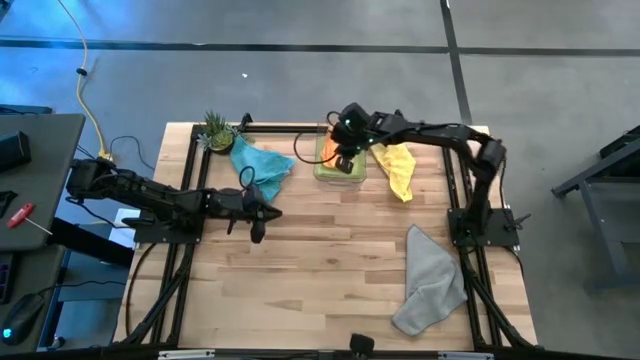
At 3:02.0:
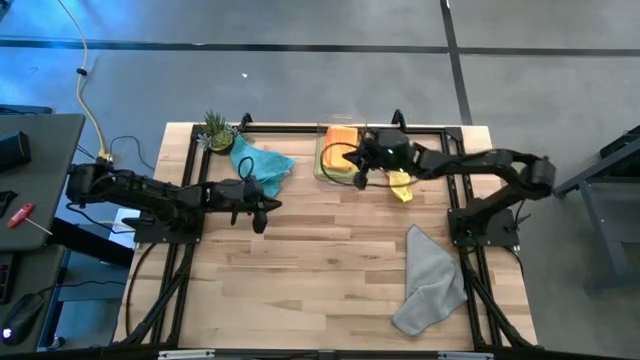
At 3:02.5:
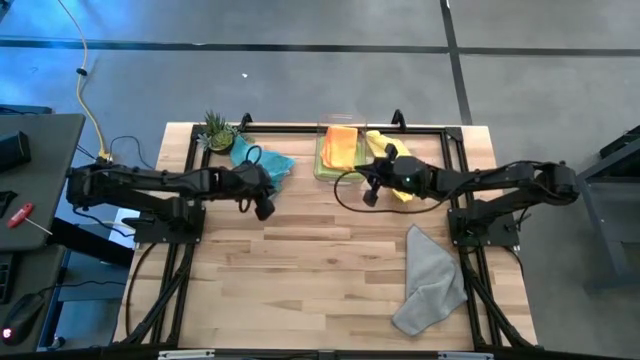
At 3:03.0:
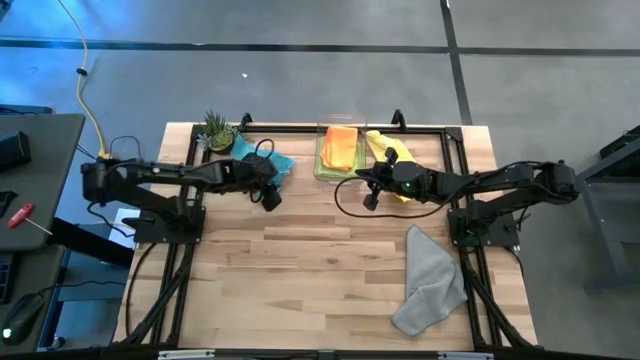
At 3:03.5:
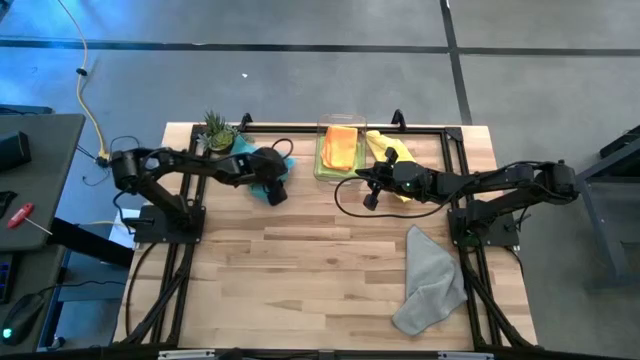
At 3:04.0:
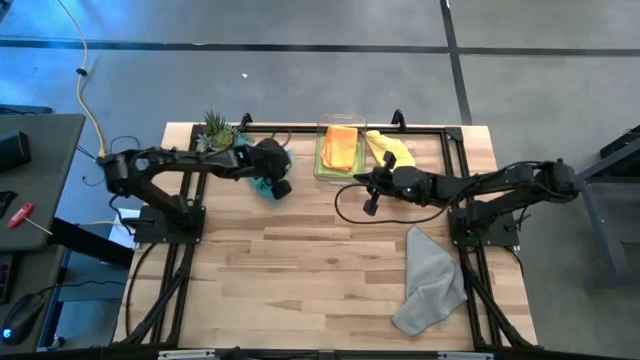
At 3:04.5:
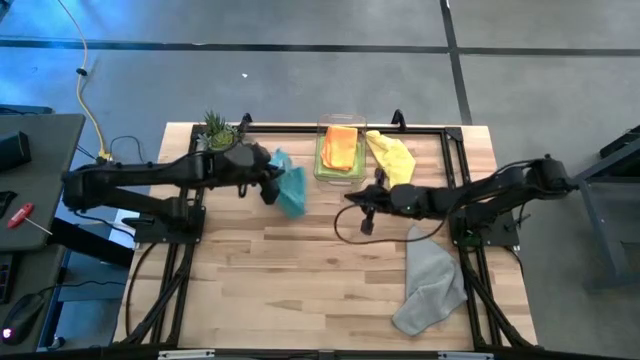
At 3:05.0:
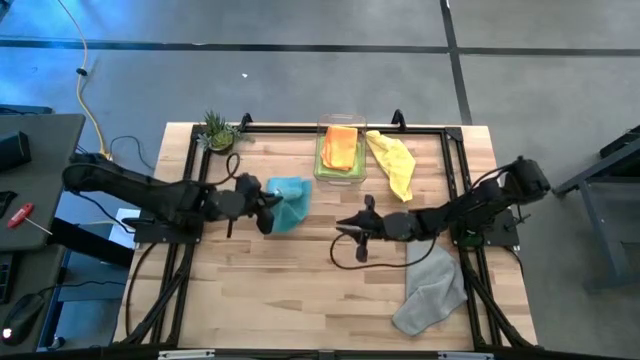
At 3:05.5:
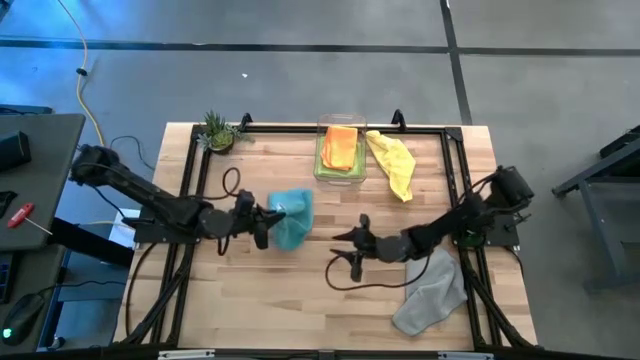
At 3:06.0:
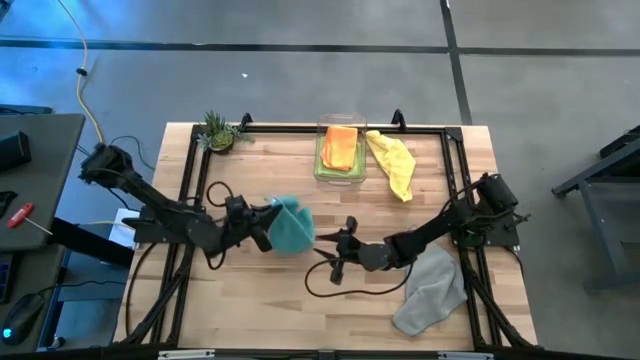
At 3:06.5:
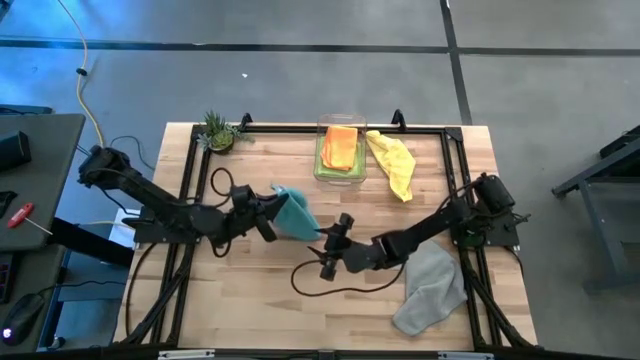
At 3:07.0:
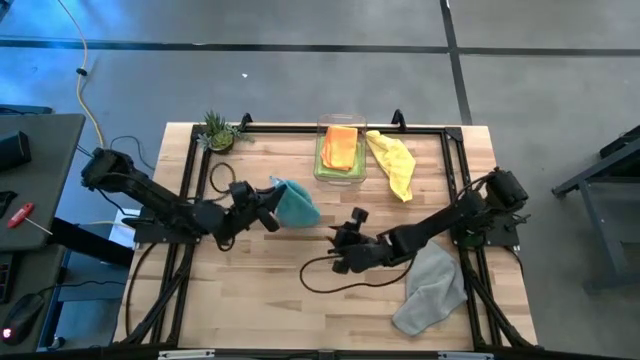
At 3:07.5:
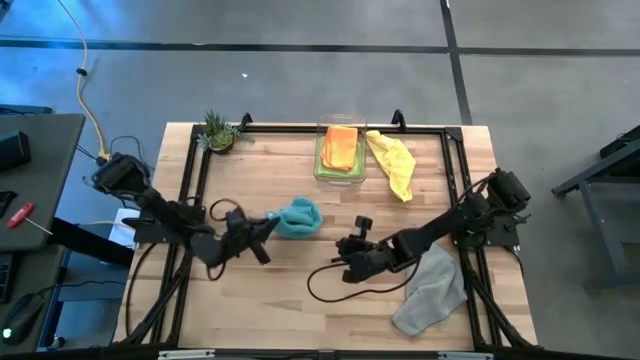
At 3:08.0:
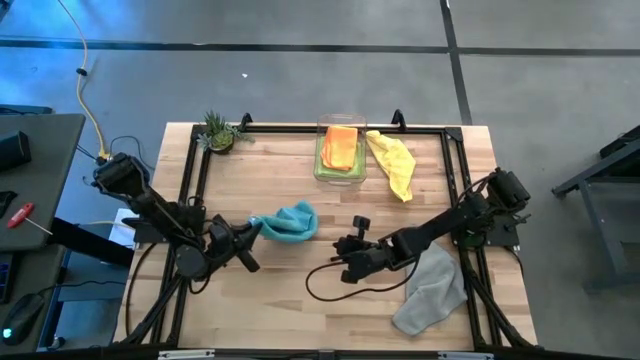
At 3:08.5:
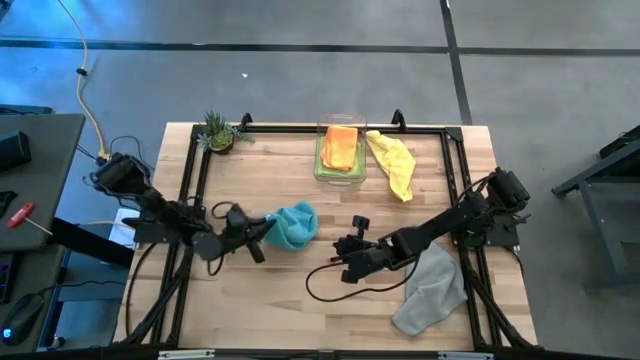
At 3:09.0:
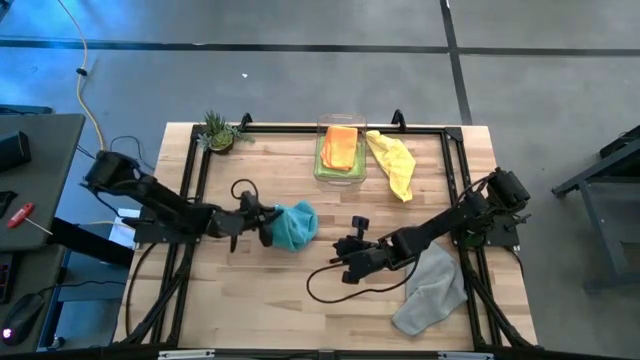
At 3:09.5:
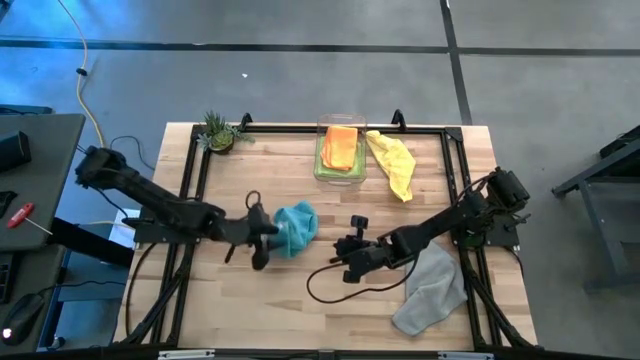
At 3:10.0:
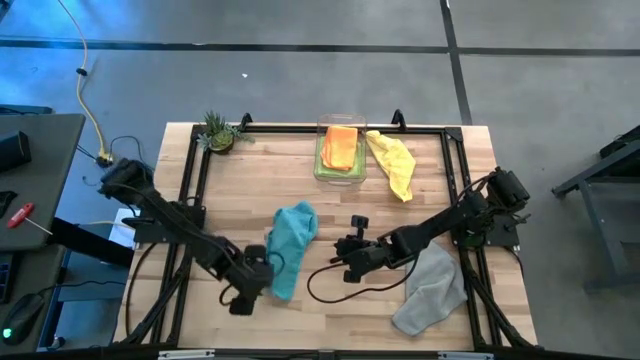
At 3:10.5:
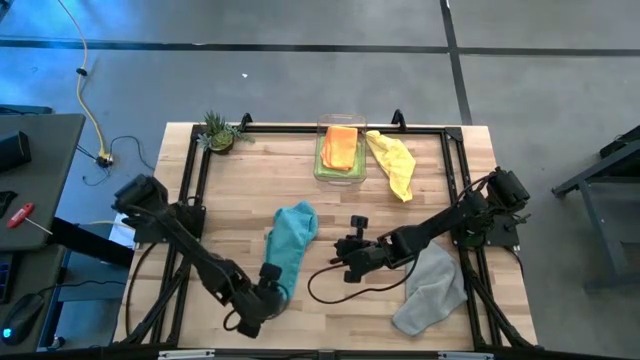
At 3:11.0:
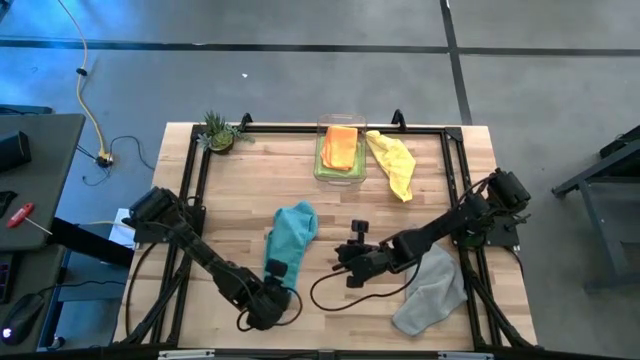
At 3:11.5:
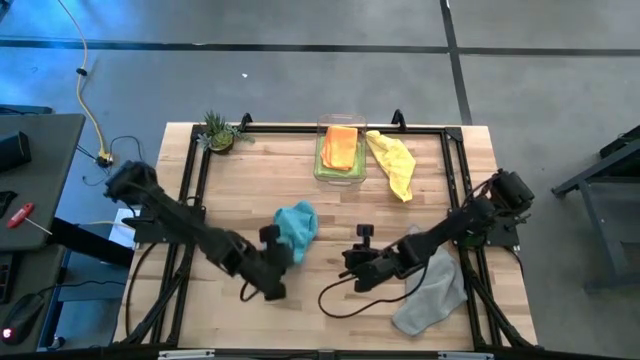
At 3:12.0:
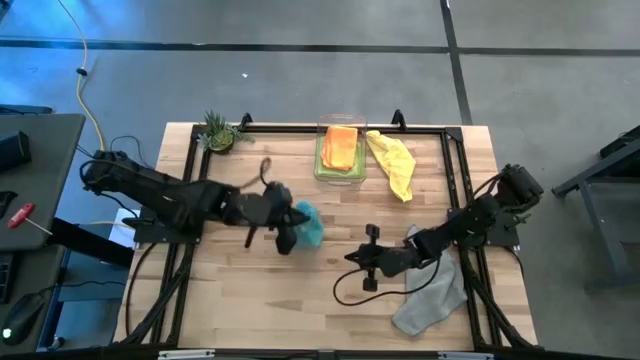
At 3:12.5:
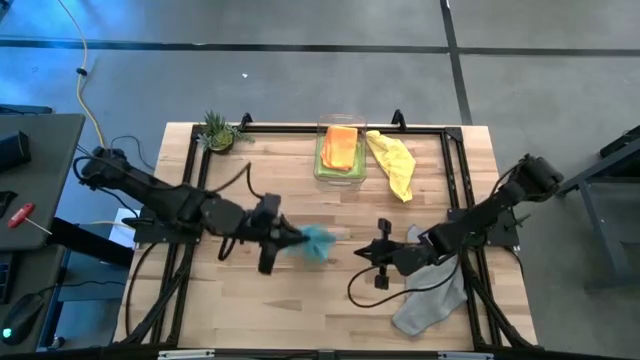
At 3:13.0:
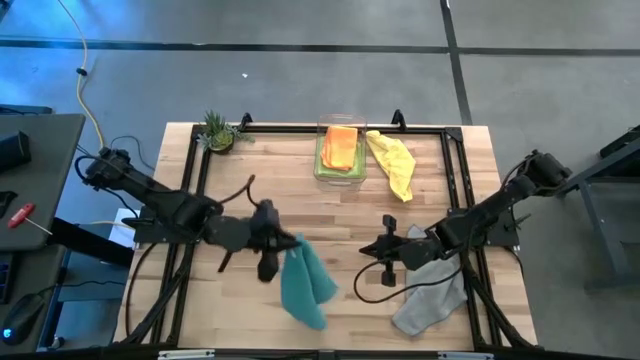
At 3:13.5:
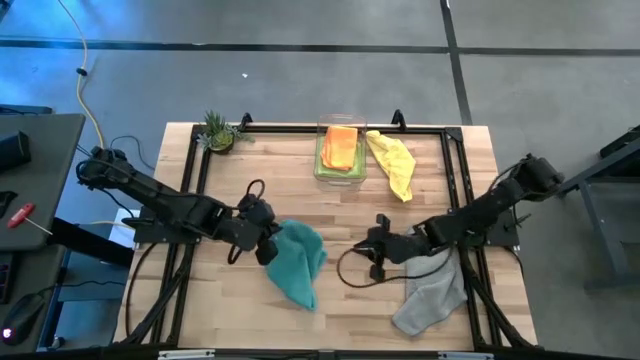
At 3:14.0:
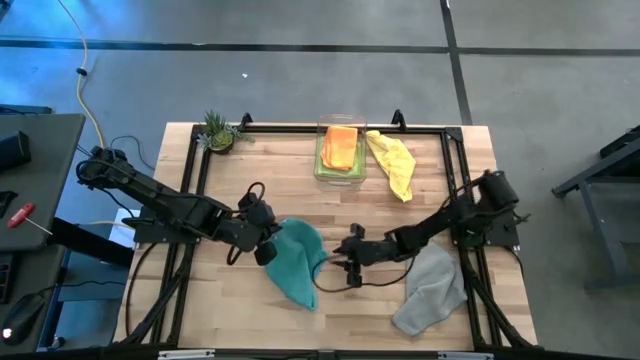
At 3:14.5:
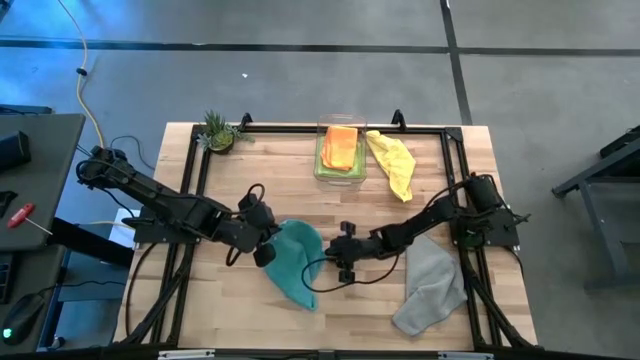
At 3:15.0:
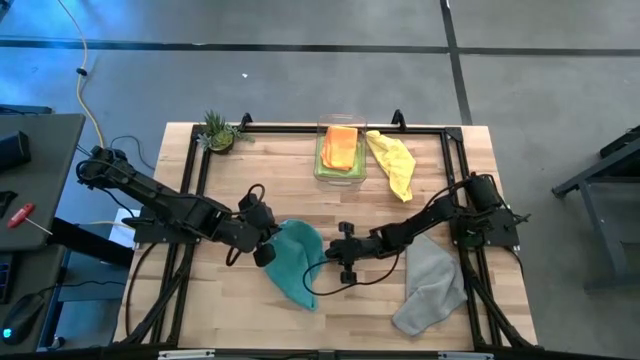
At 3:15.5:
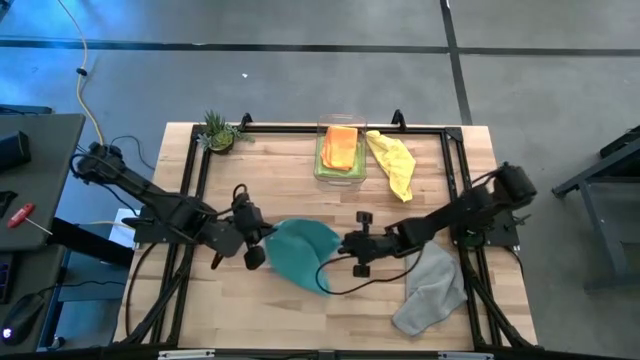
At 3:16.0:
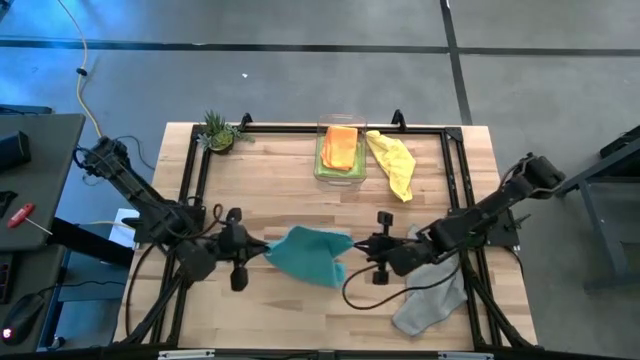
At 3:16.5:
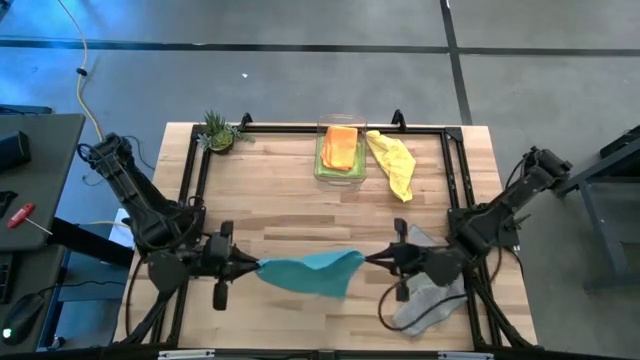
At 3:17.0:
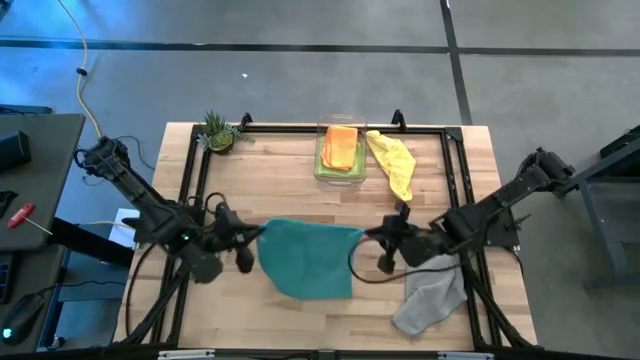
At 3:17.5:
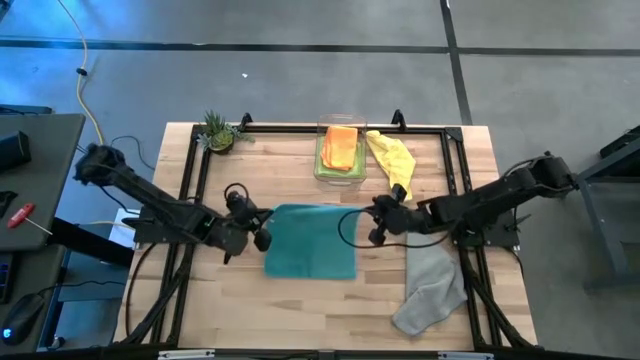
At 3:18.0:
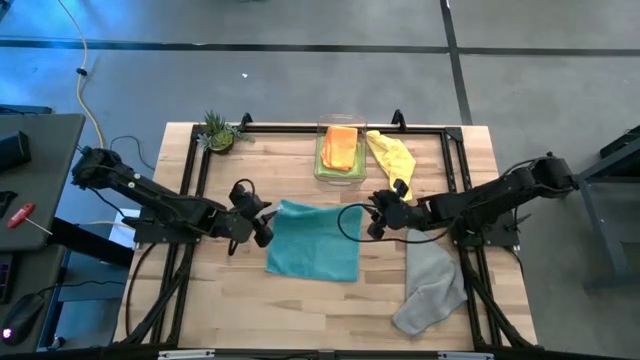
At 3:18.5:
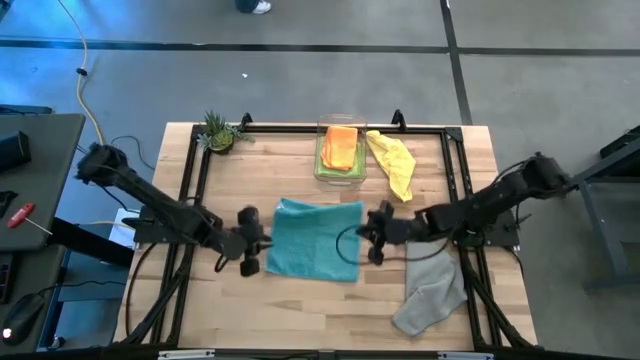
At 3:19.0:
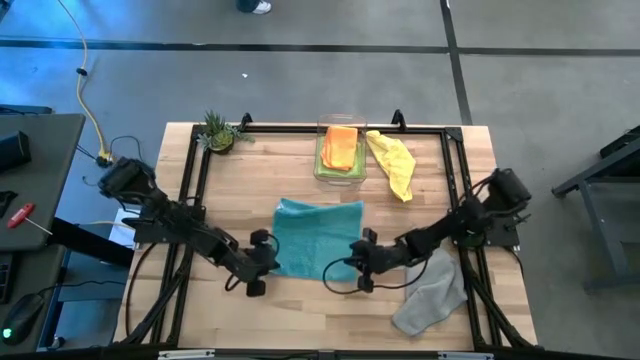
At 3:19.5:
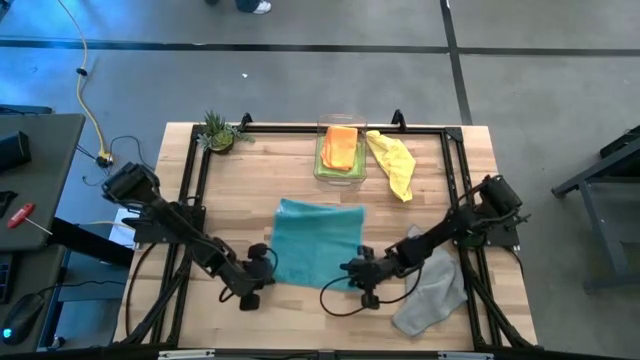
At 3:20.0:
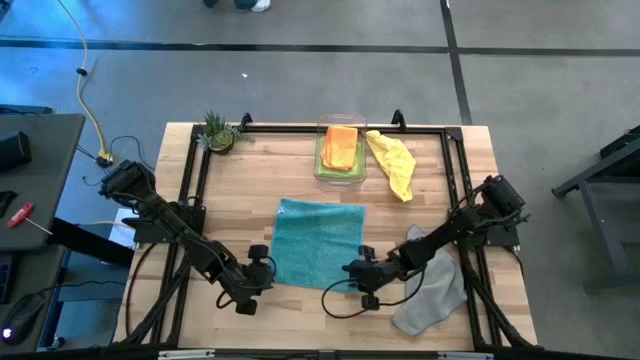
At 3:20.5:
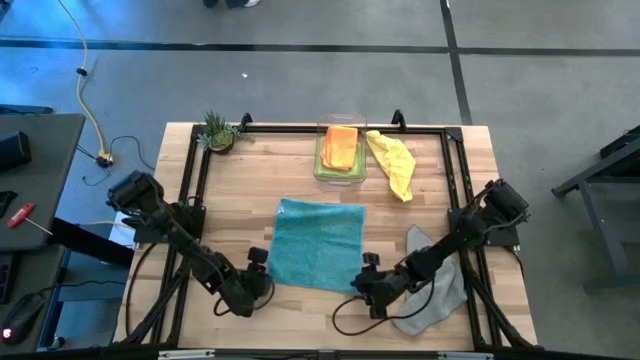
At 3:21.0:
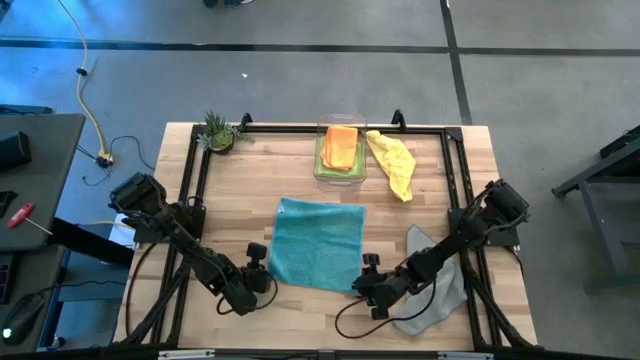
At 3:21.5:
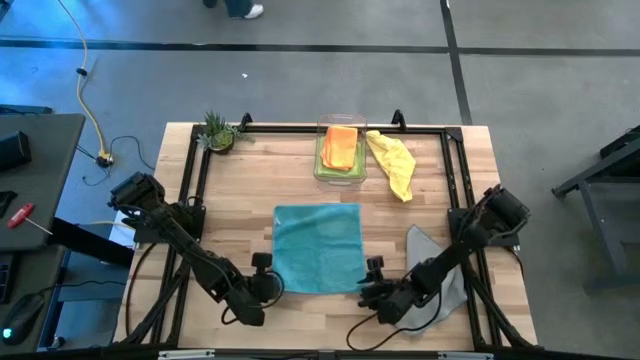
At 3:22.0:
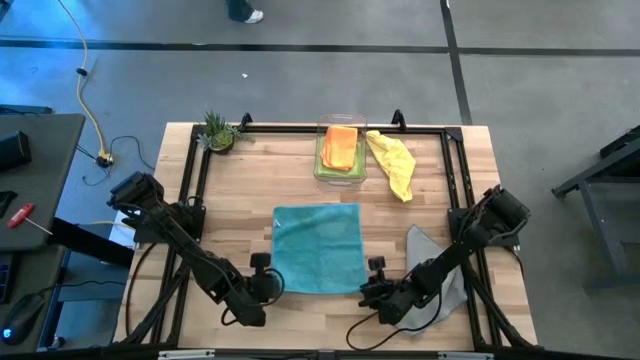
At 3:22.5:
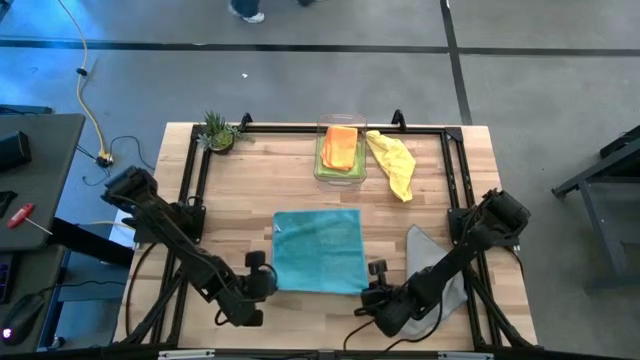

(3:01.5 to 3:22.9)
Task: Fold microfiber towels
Fold the blue microfiber cloth

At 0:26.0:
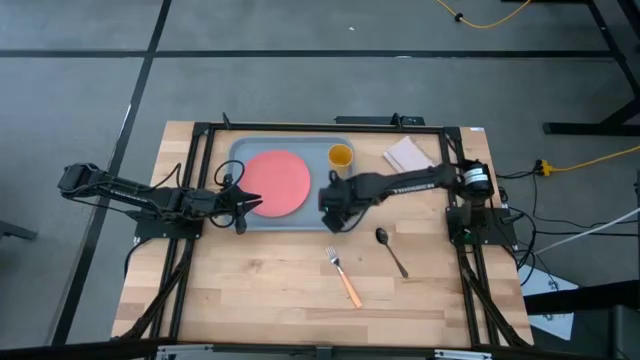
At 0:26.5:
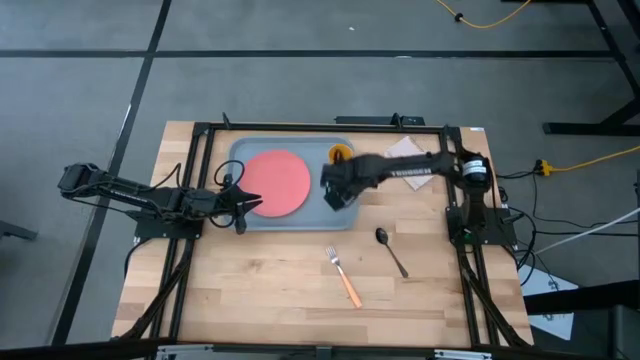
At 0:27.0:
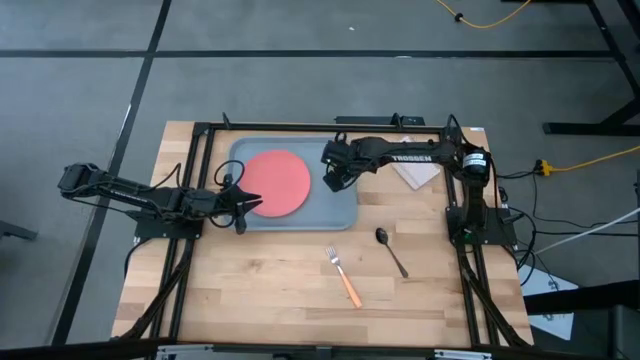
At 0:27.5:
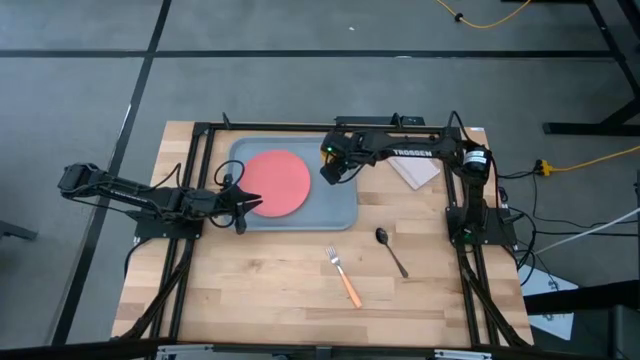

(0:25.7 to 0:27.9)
Task: Pick and place plate/cup/fork/spoon on tray
Adjust the yellow cup on the blue serving tray
